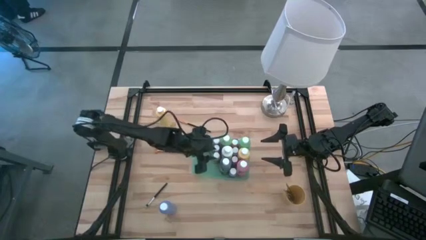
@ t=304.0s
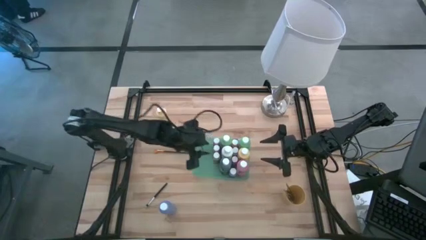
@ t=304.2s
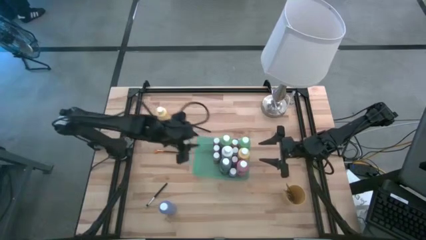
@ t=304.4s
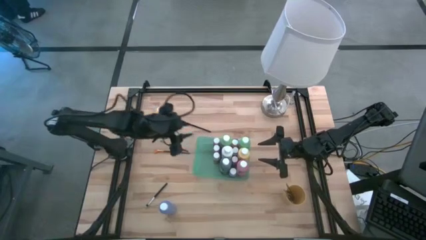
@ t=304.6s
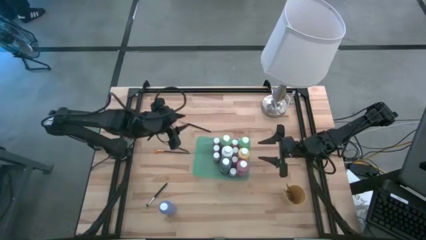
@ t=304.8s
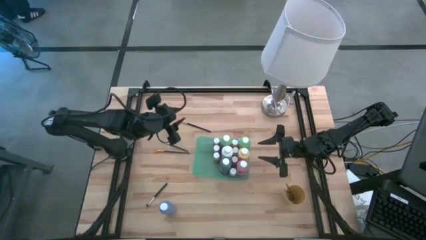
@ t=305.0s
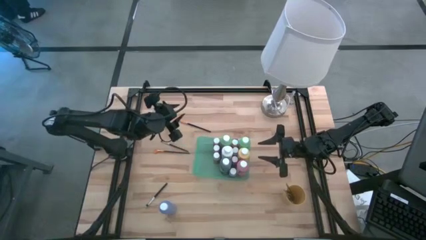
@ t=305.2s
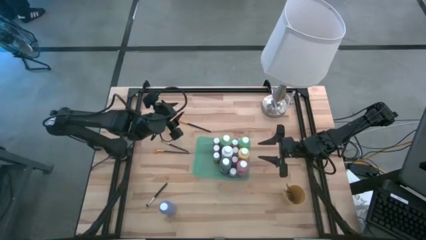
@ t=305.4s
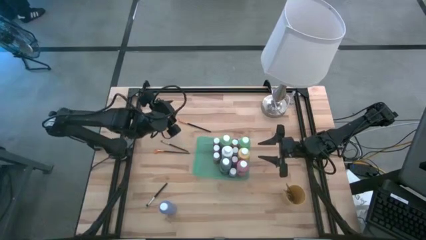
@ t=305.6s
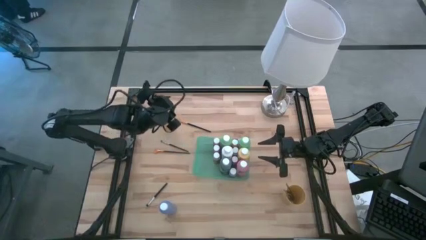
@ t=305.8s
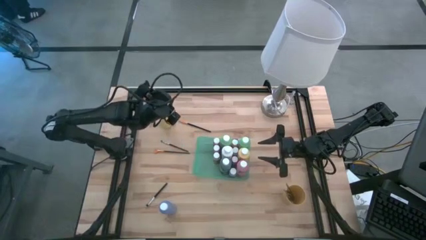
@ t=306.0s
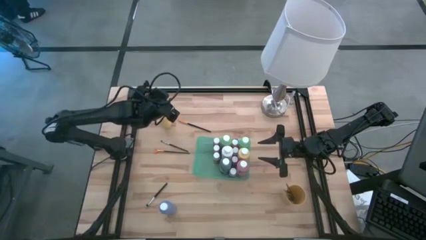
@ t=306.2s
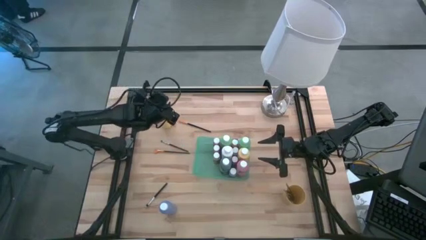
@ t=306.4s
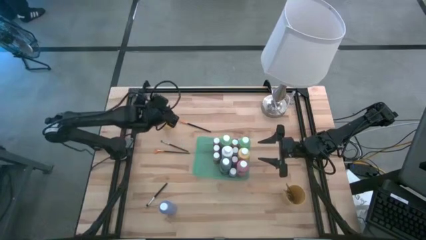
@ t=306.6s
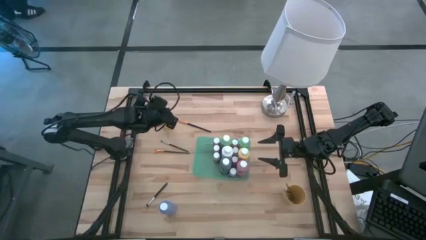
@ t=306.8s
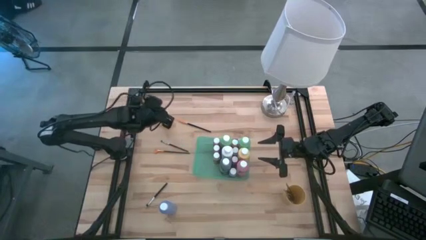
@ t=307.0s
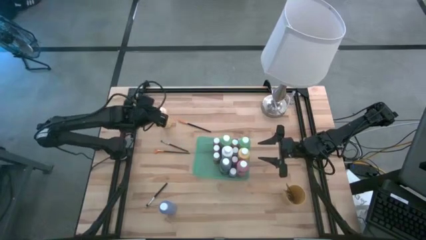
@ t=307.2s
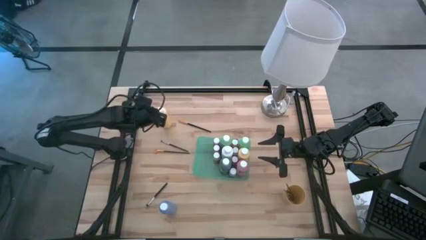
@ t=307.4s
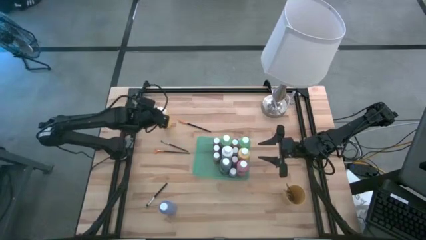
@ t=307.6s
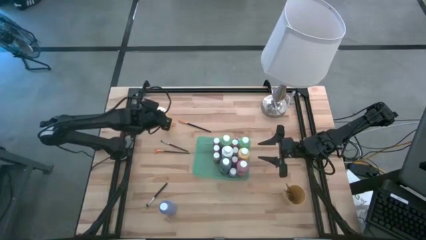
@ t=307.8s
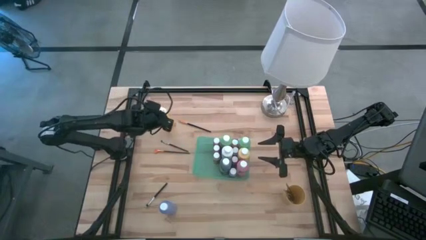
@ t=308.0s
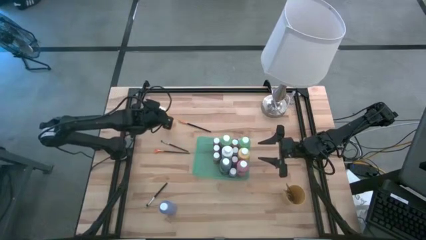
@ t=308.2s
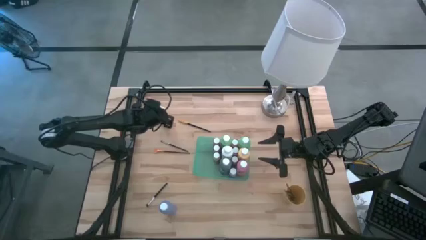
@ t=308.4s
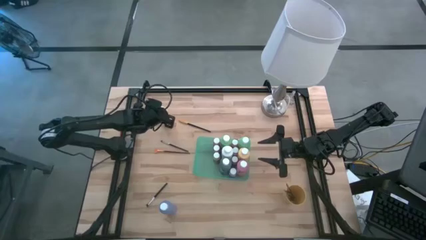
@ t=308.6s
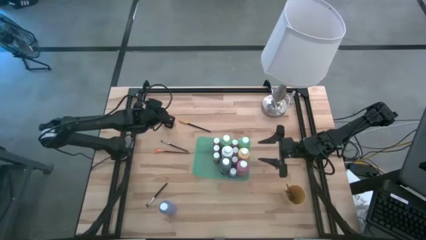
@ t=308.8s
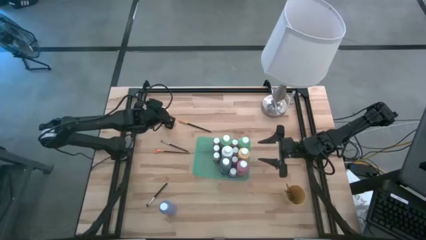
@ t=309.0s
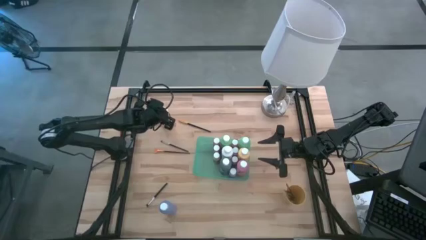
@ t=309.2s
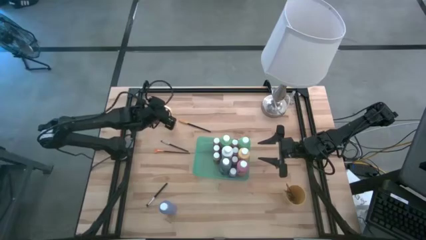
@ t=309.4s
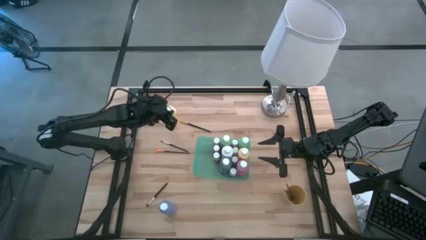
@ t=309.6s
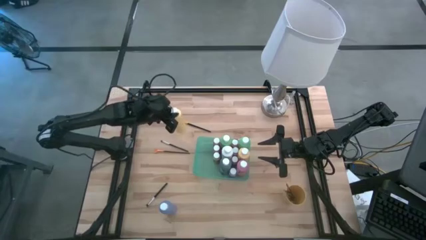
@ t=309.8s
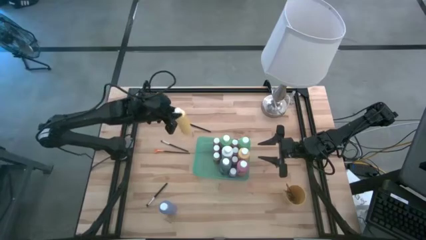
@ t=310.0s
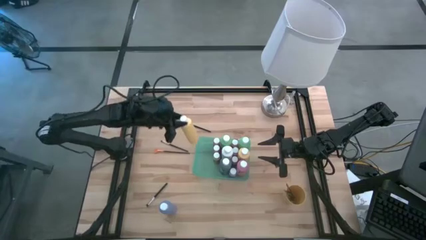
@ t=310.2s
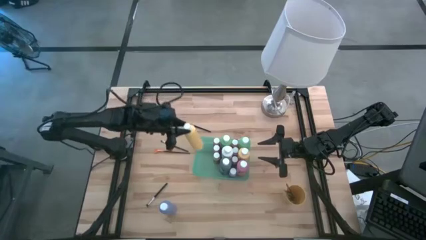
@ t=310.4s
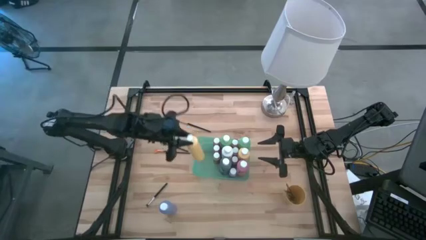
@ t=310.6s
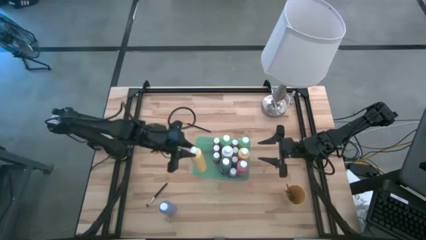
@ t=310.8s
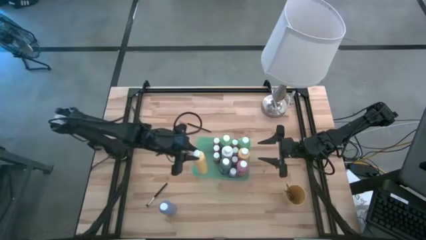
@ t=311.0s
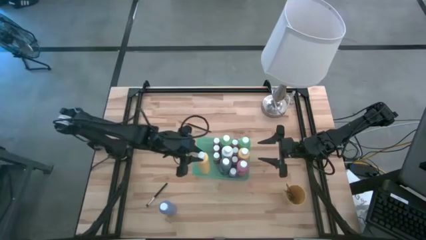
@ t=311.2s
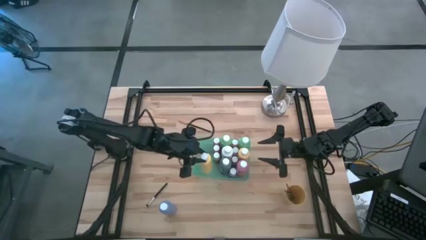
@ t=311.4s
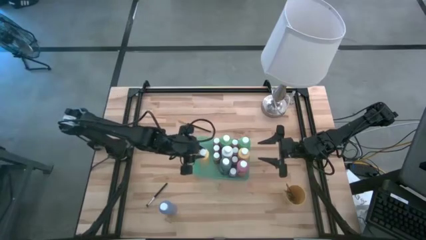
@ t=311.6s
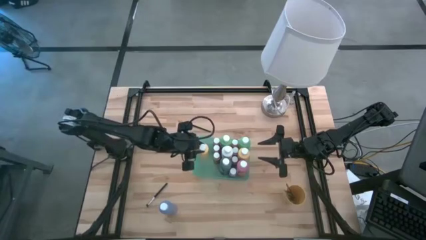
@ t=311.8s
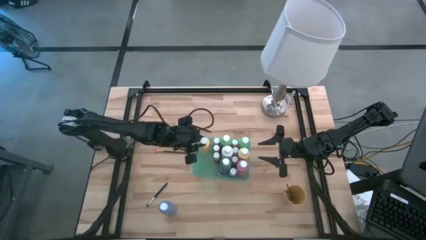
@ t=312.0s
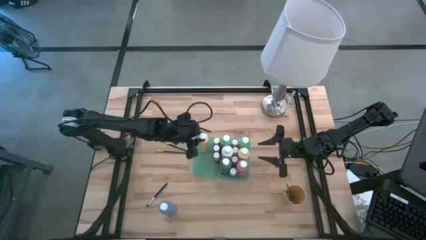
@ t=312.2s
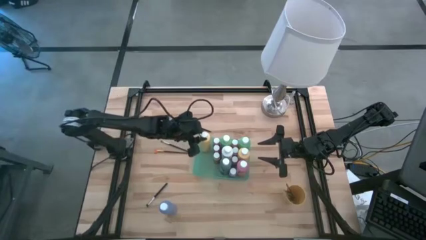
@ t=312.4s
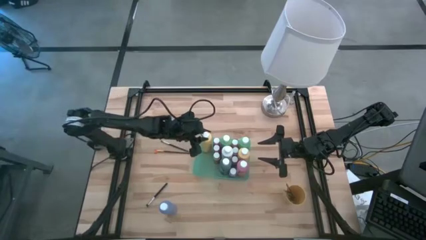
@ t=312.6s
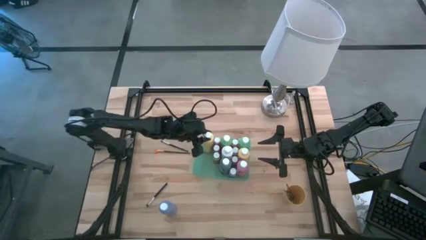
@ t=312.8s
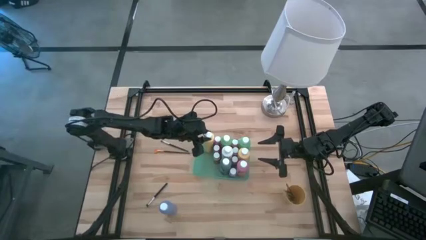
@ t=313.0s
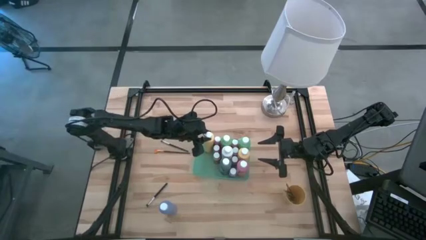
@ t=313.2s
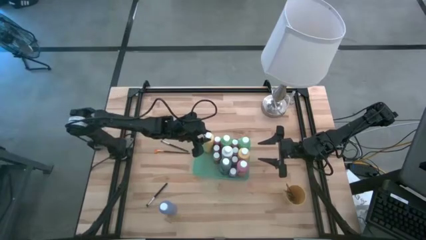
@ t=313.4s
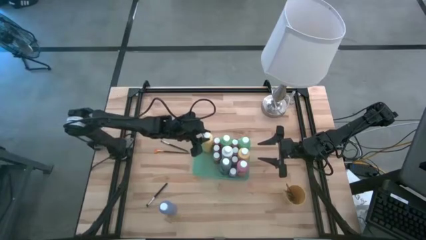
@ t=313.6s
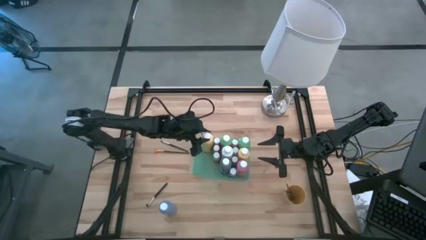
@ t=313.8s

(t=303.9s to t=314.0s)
Task: Pick & Place Paint Supplies
Put the yellow paint bottle into the green bin

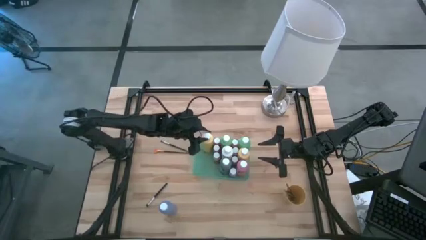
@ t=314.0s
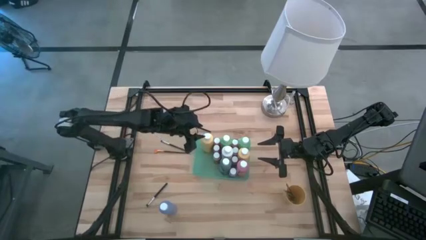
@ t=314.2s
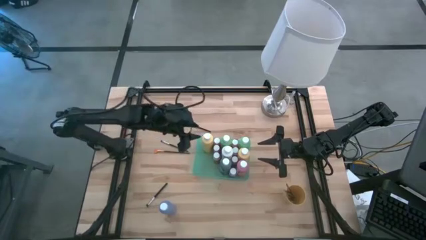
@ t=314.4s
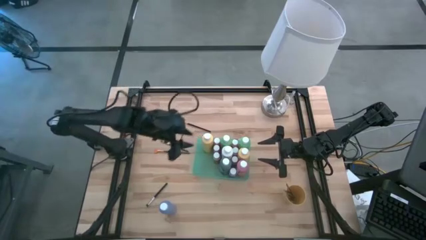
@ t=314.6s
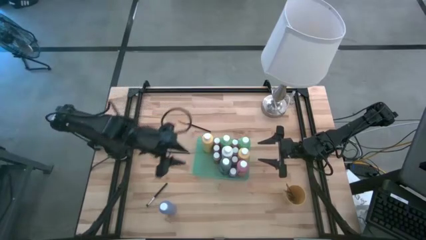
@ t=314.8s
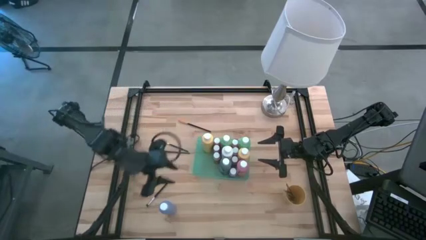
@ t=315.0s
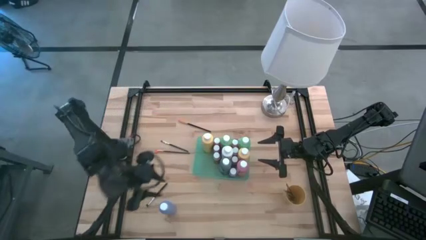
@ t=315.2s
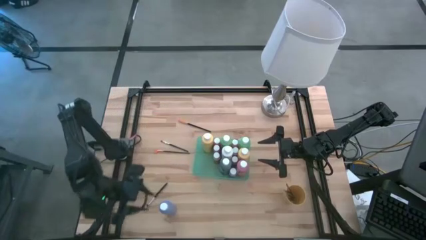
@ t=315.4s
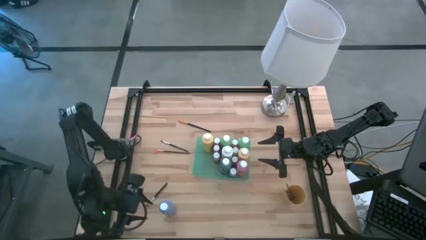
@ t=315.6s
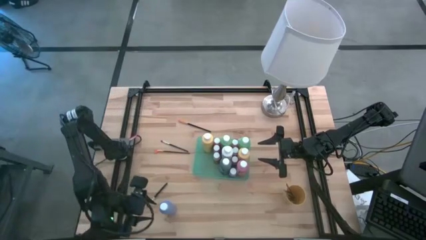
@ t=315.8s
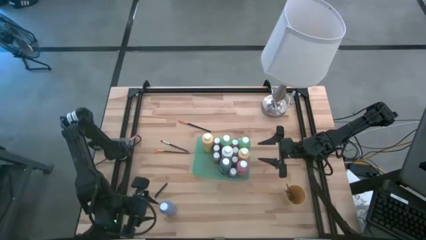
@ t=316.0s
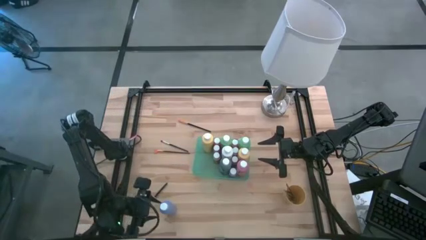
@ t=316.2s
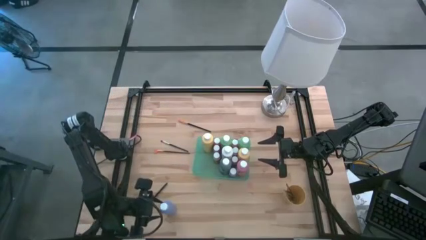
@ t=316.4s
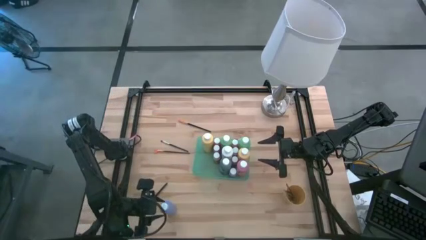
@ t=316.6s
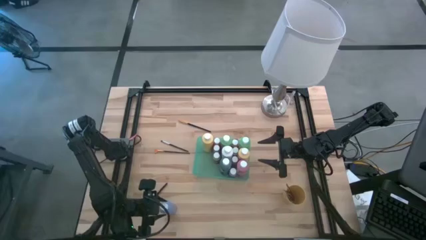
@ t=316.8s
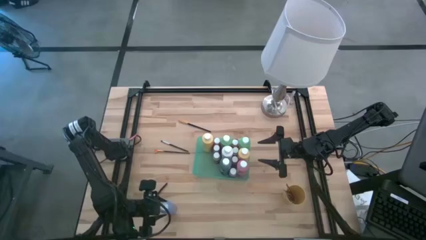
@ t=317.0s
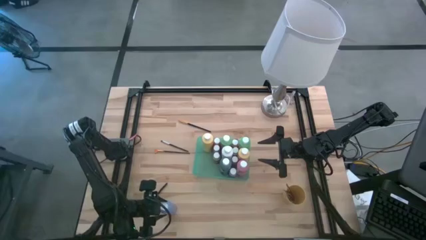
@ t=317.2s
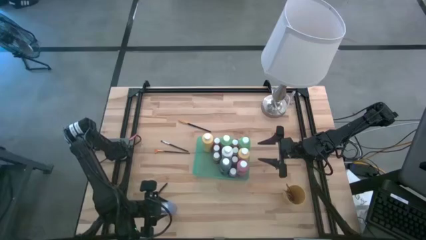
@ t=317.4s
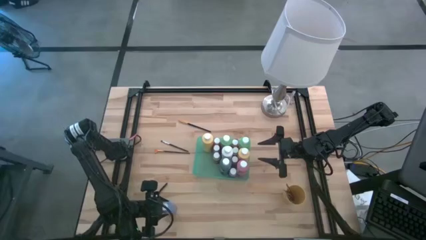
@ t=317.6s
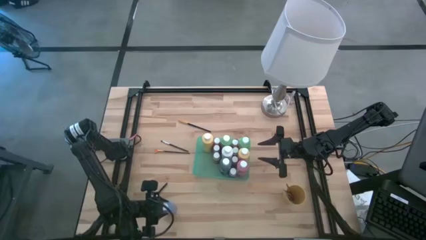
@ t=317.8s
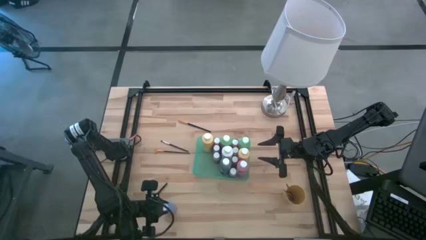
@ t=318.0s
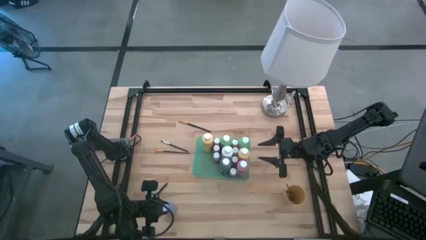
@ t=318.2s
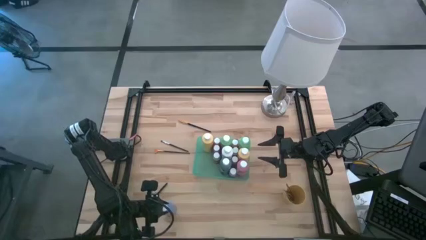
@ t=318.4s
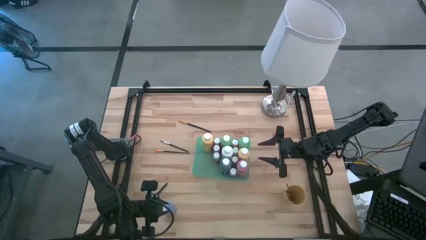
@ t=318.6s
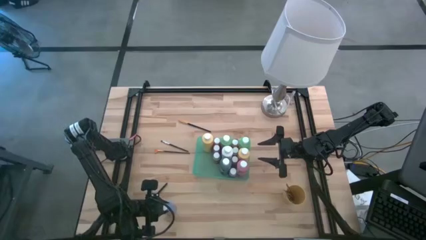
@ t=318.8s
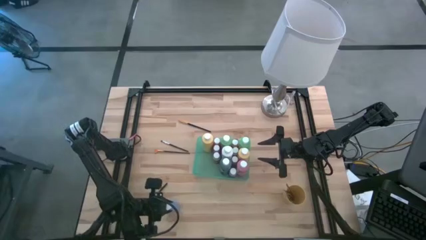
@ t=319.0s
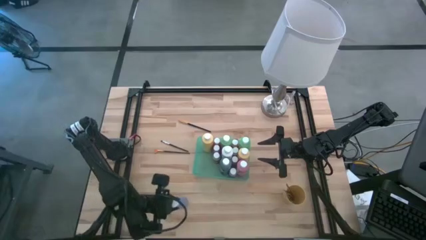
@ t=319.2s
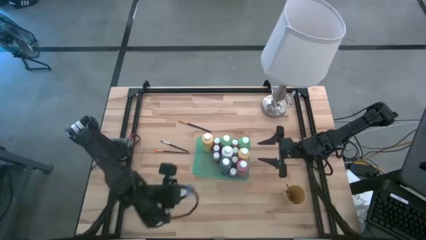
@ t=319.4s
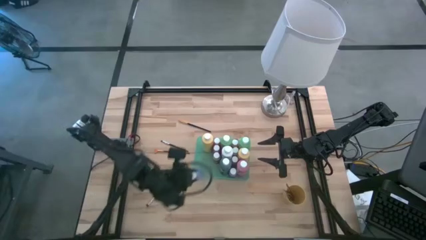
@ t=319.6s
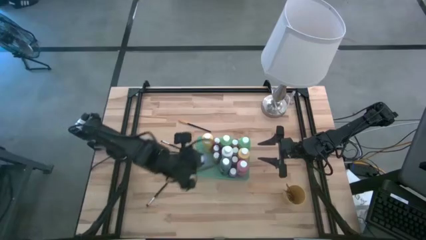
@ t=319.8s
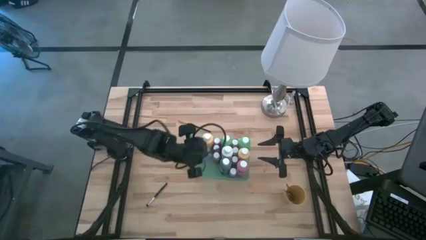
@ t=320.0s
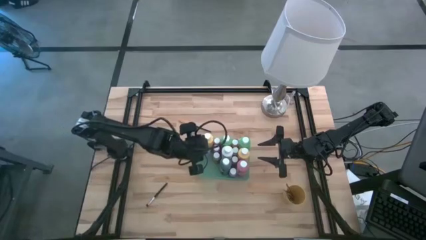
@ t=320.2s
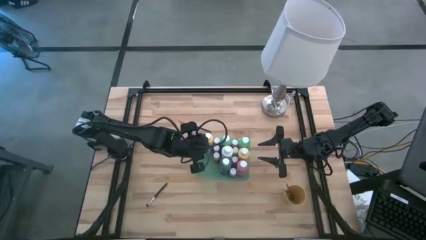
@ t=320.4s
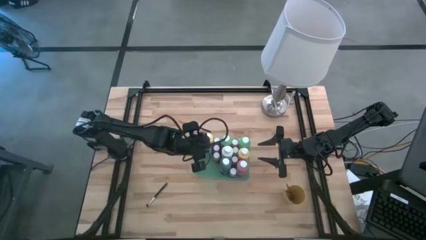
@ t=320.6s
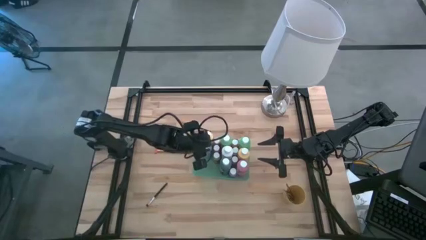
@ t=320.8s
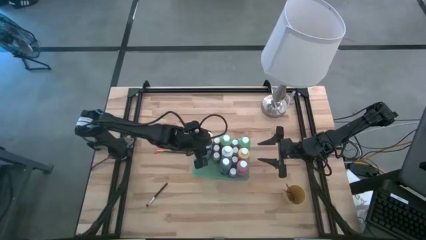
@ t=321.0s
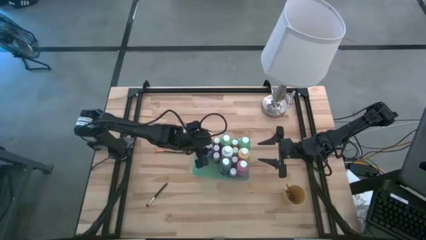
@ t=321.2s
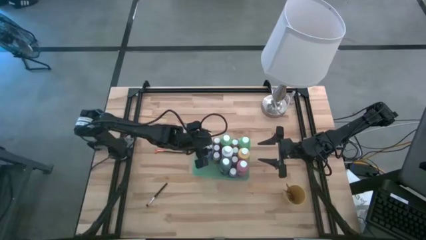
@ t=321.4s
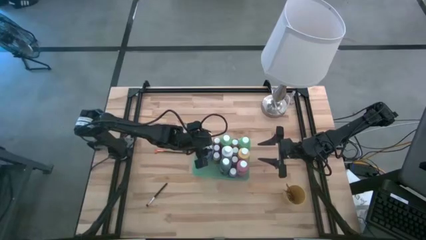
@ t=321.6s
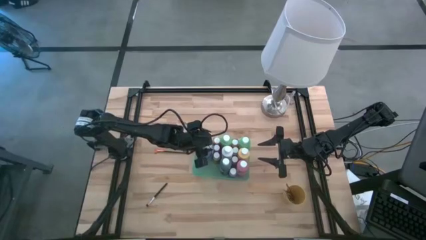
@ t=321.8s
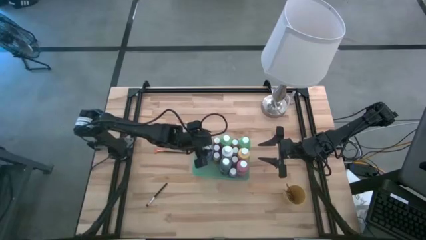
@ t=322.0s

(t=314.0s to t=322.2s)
Put the blue paint bottle into the green bin
